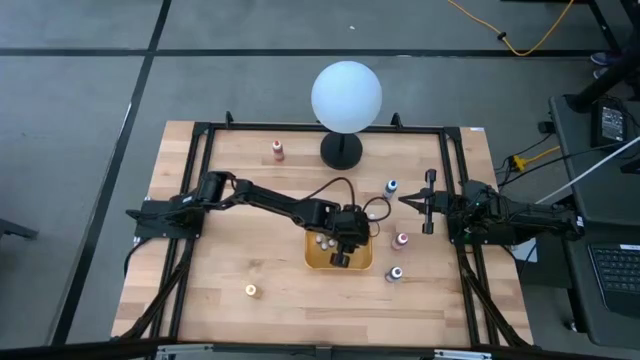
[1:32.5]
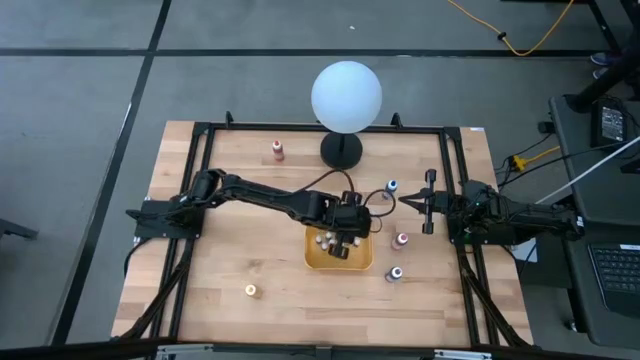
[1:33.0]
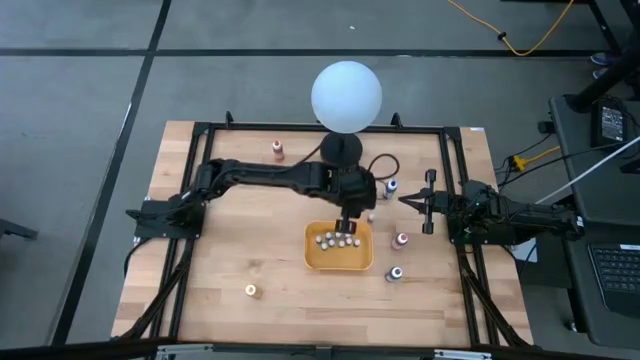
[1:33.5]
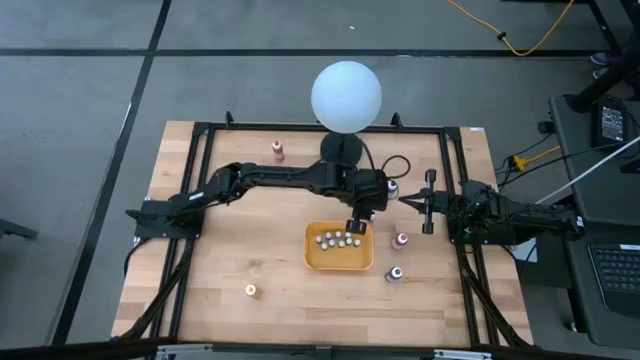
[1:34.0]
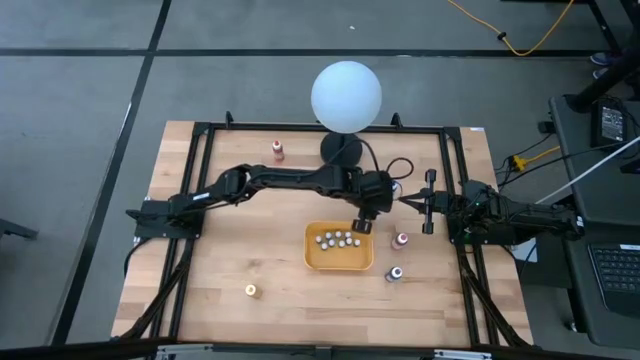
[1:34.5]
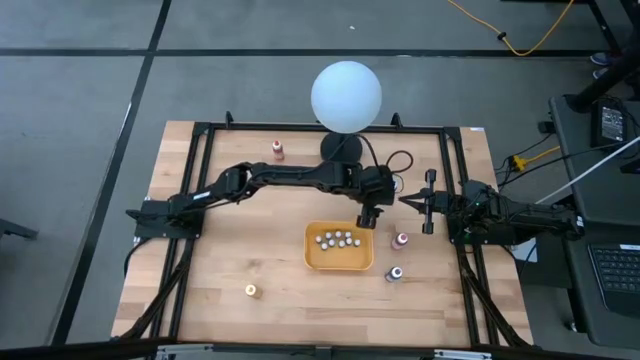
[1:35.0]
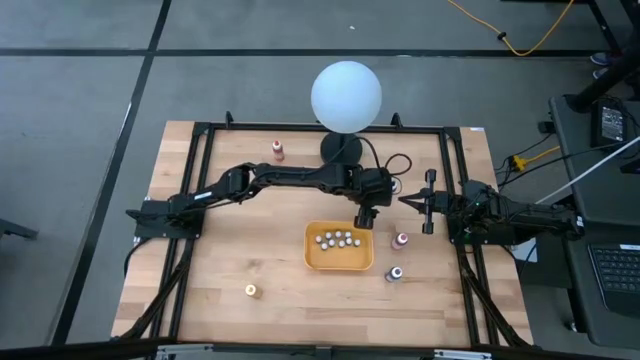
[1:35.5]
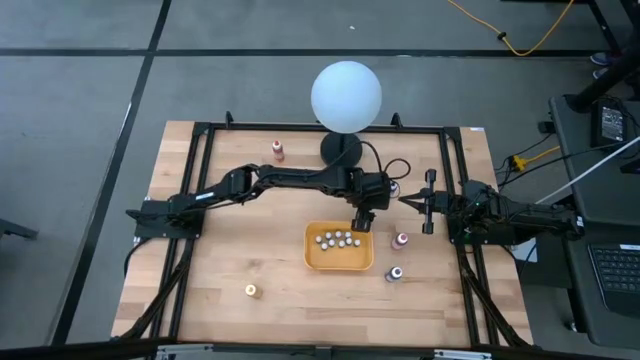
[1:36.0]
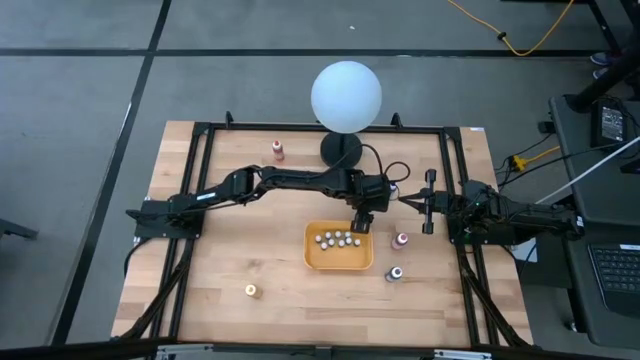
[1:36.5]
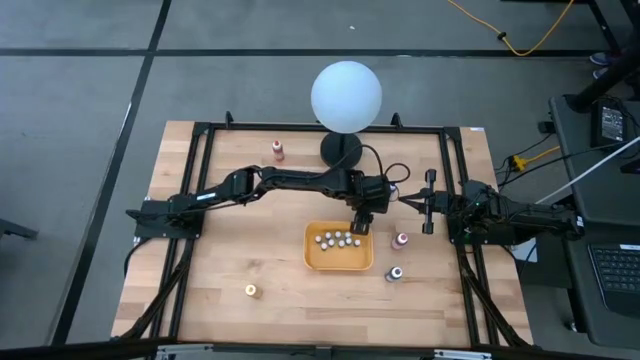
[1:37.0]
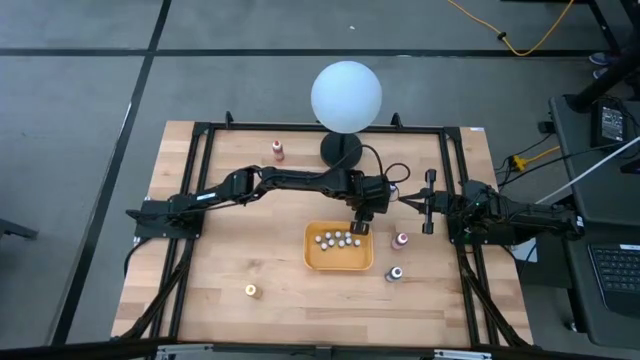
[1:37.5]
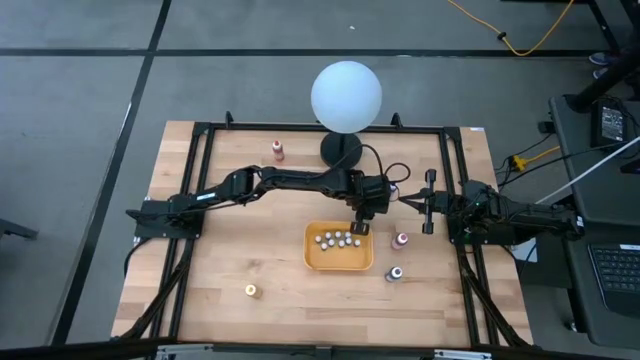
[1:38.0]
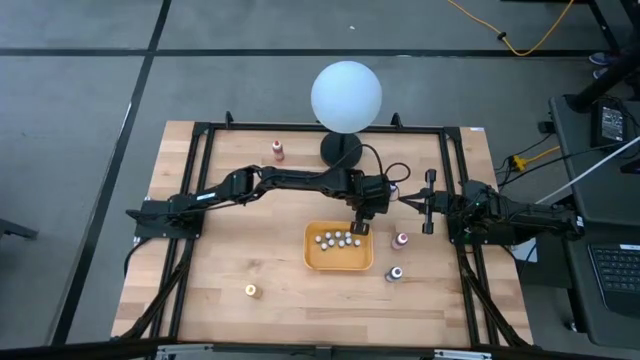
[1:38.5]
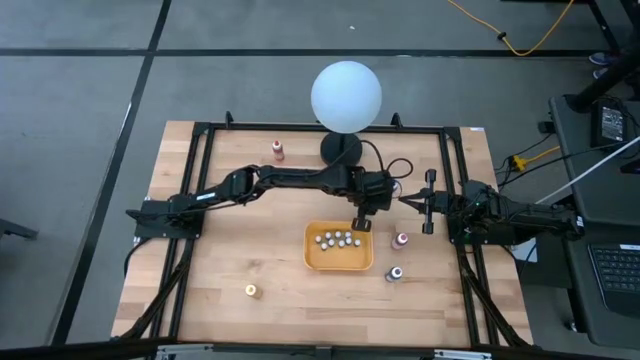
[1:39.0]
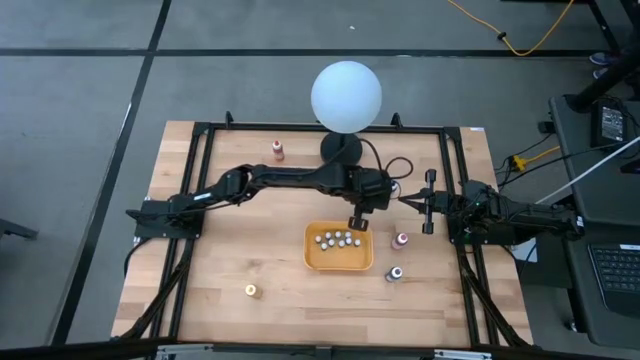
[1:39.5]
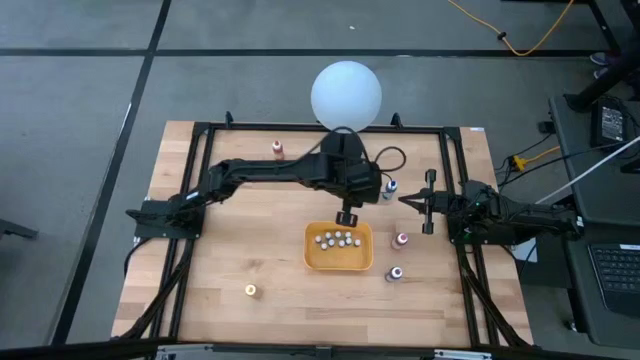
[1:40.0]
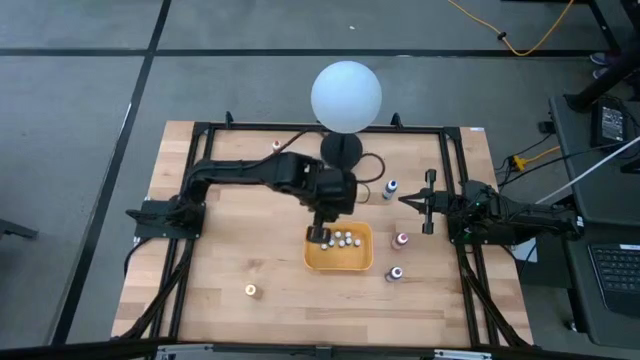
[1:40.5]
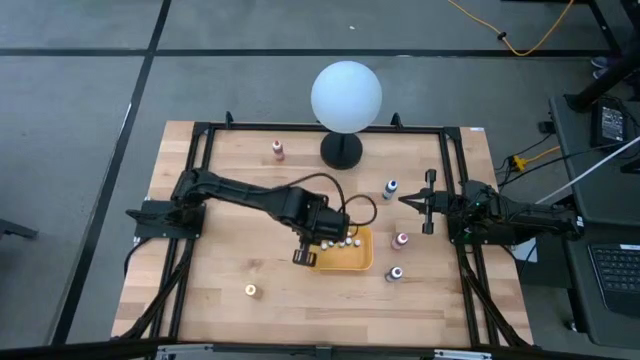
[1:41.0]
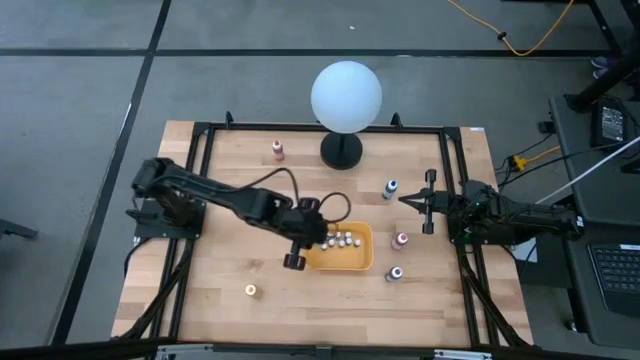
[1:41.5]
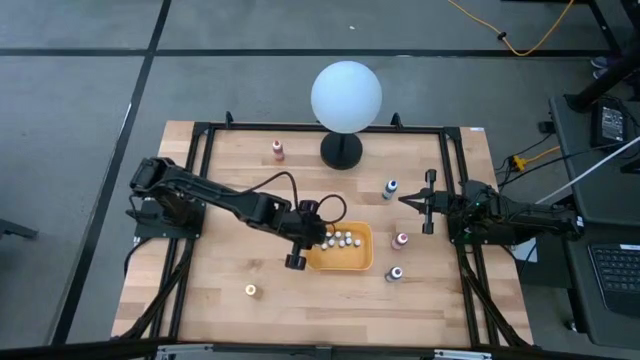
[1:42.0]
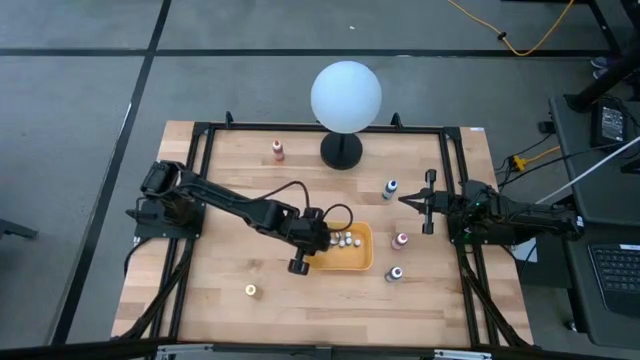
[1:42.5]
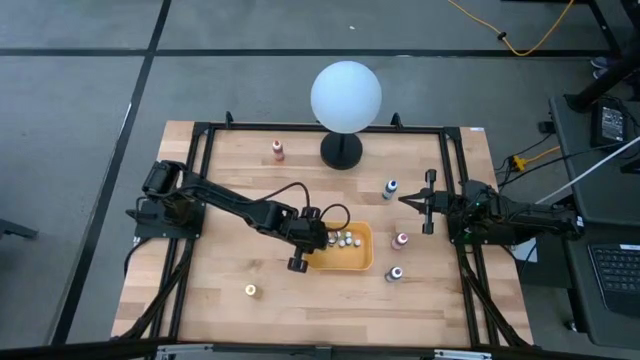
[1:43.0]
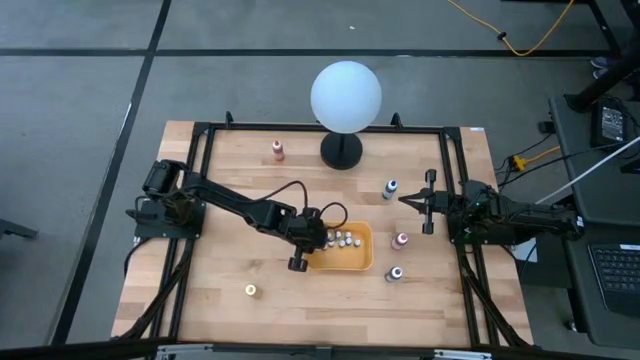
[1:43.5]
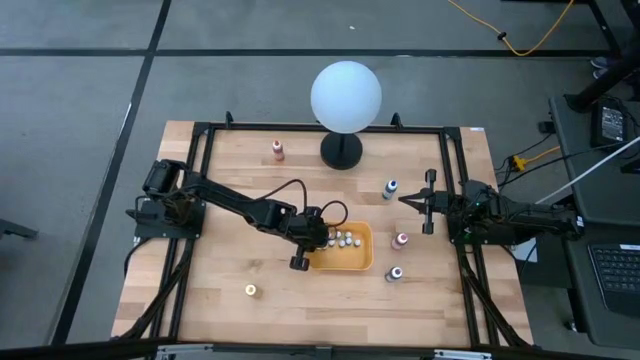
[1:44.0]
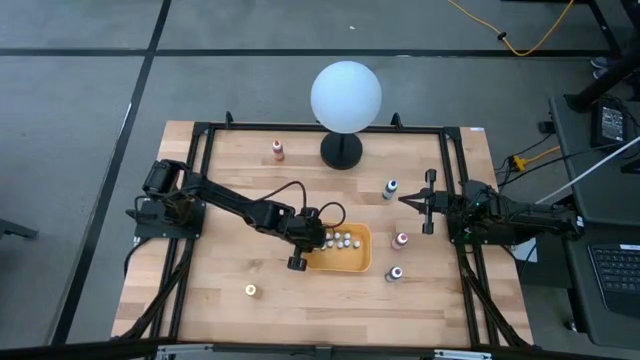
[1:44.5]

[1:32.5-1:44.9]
Task: Pick & Place food coloring
Put the small green food coloring bottle into the yellow bin

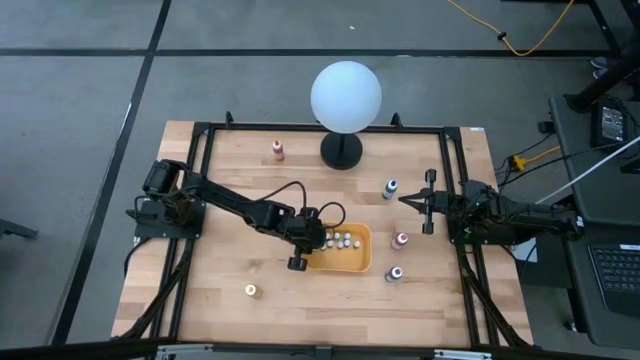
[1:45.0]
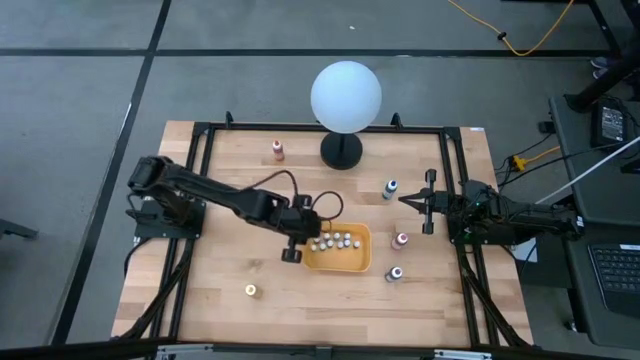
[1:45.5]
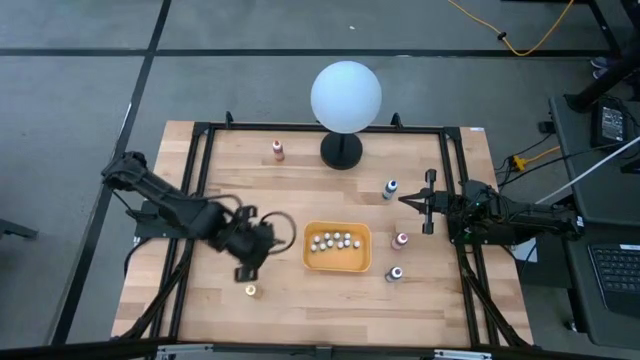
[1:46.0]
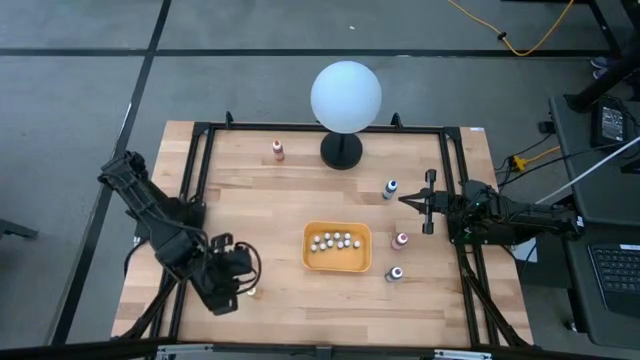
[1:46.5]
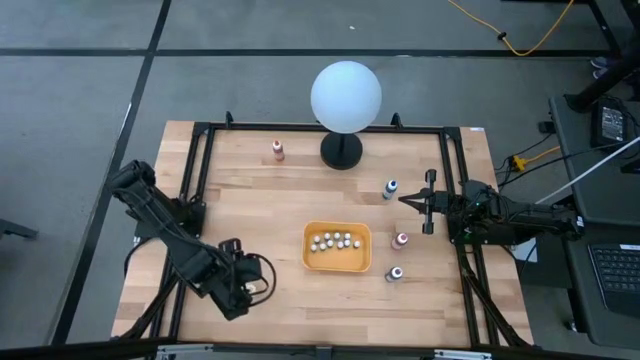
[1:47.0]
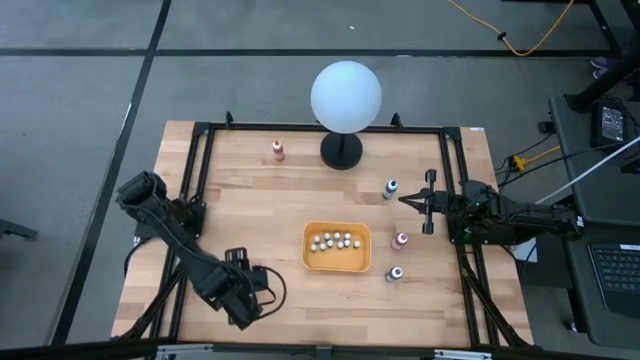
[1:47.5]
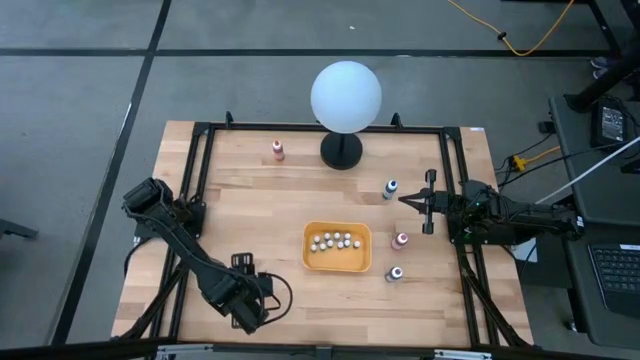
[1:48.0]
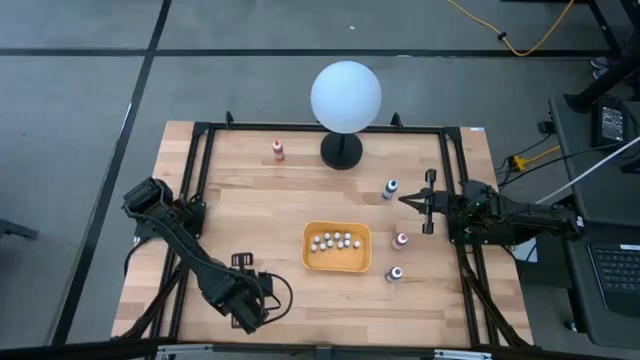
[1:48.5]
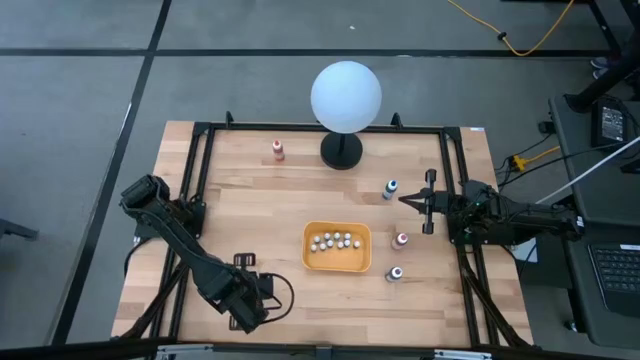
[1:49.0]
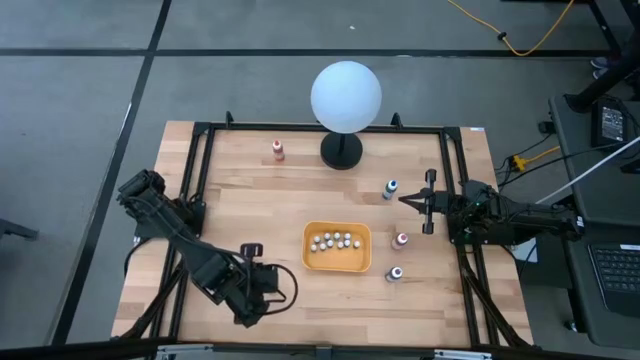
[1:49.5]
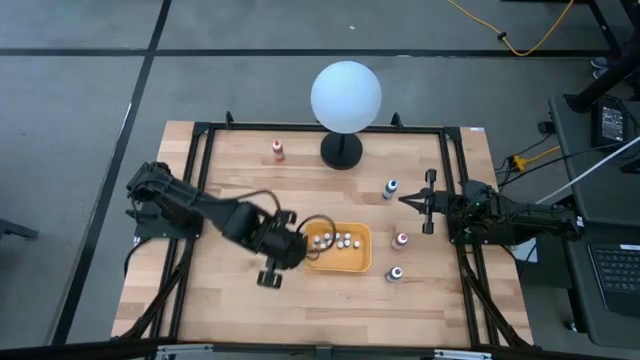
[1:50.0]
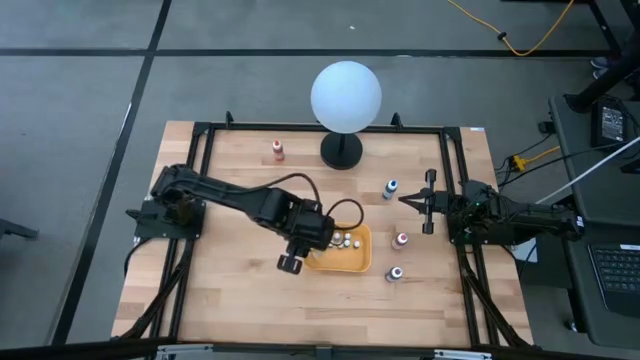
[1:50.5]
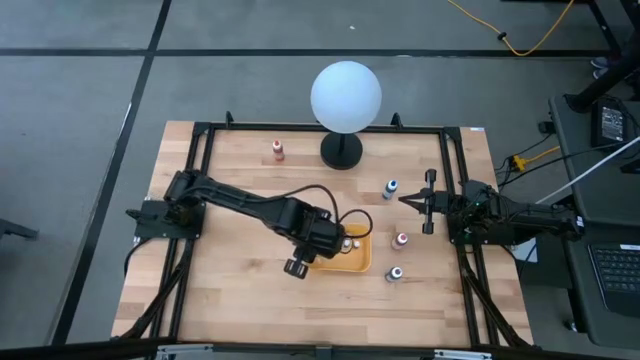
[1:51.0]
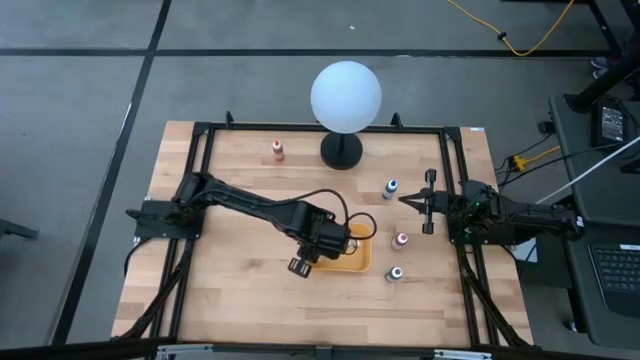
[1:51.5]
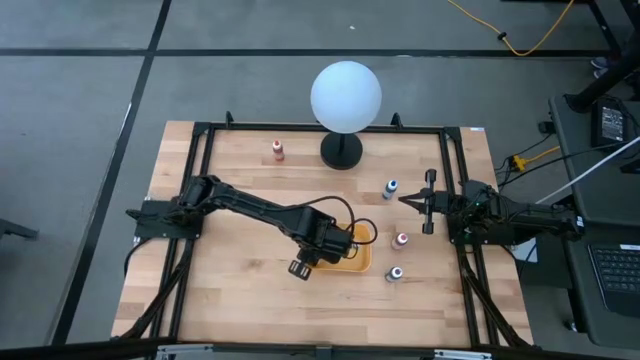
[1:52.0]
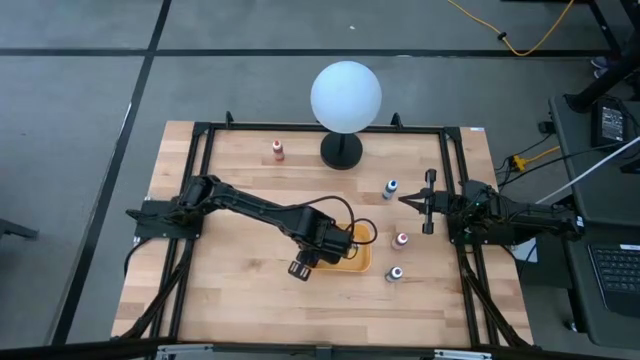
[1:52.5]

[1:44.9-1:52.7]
Put the large yellow food coloring bottle into the yellow bin
